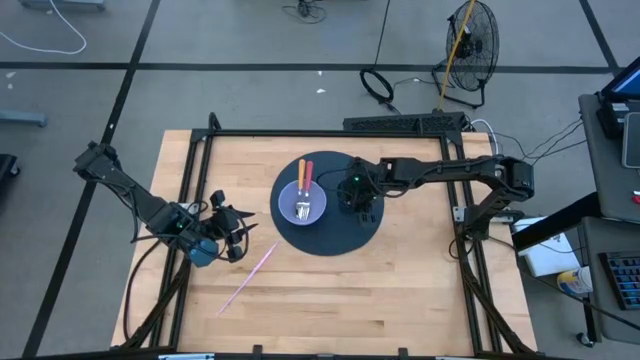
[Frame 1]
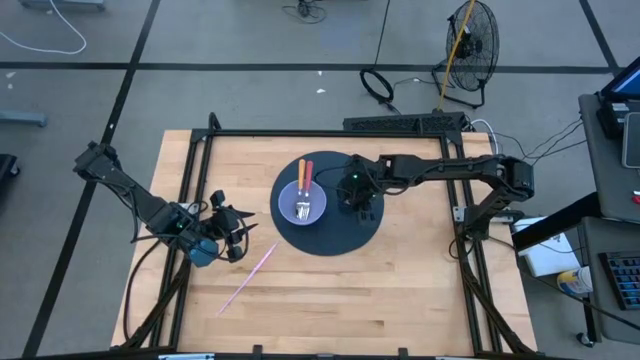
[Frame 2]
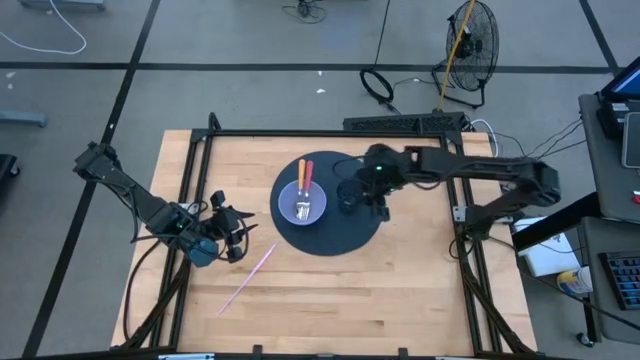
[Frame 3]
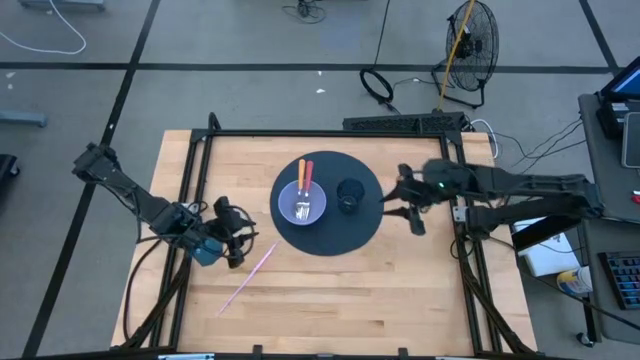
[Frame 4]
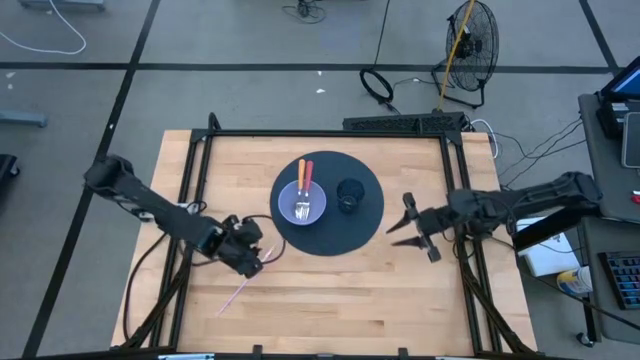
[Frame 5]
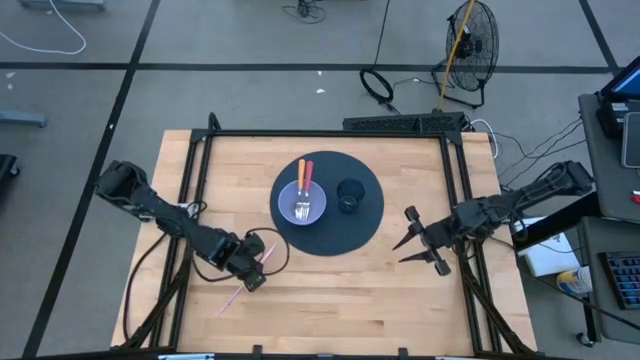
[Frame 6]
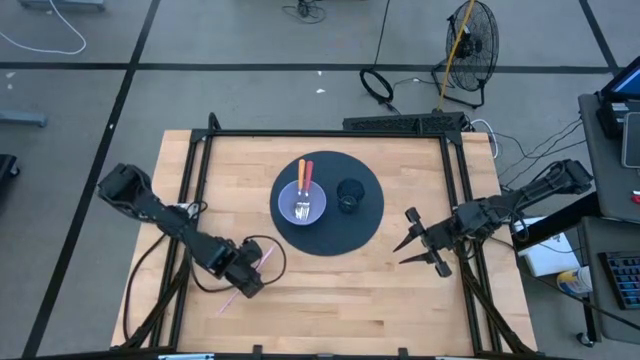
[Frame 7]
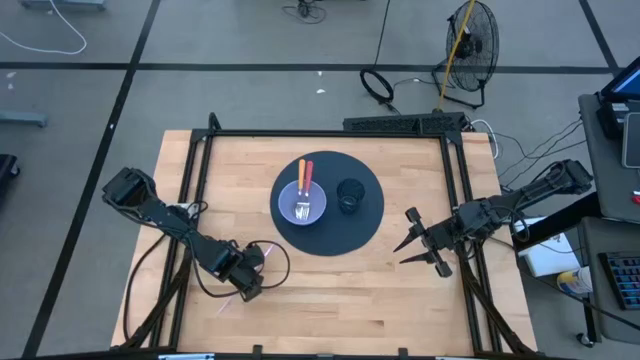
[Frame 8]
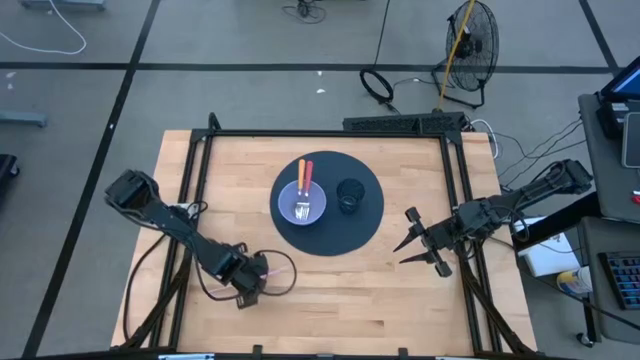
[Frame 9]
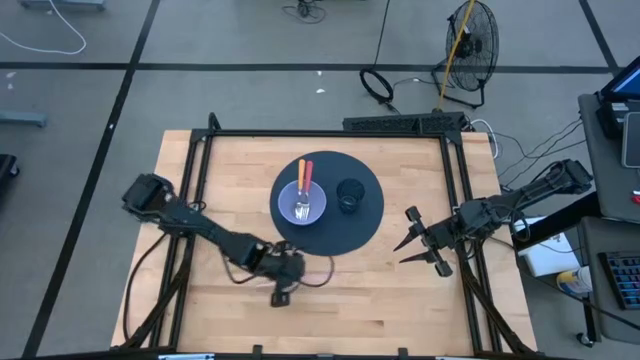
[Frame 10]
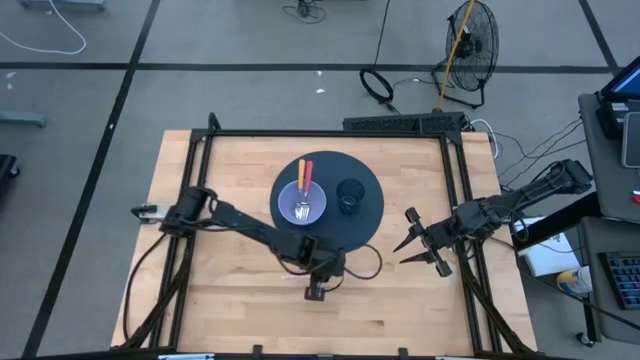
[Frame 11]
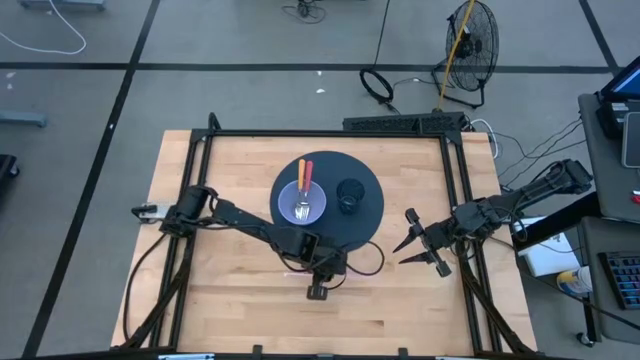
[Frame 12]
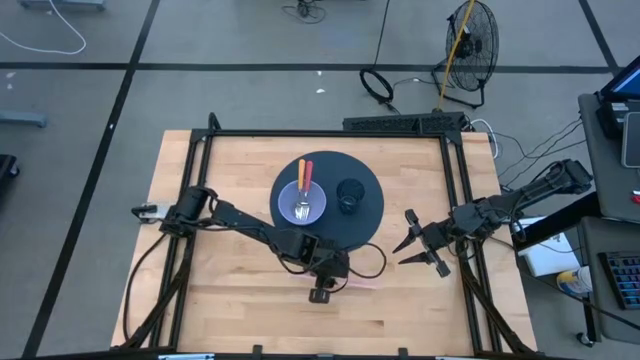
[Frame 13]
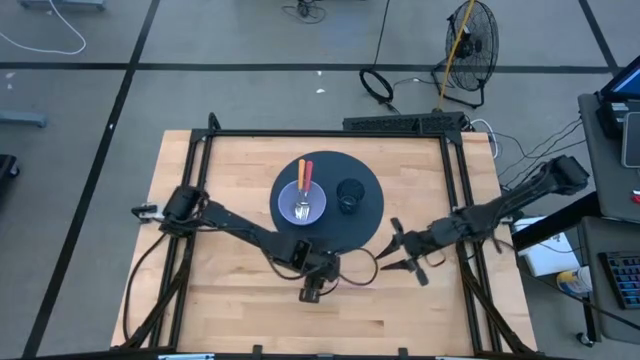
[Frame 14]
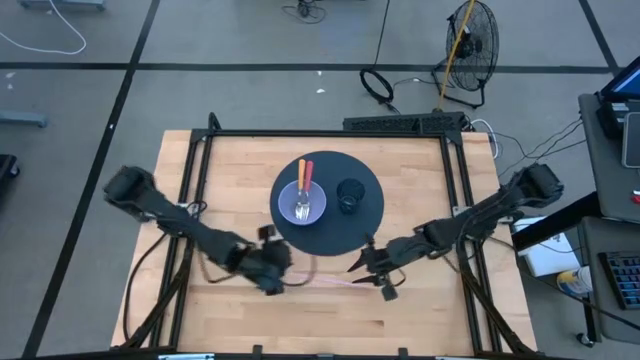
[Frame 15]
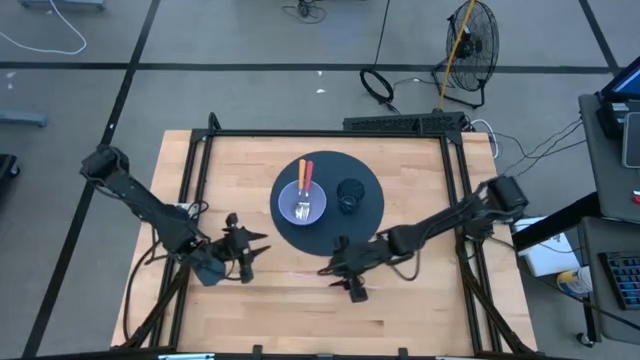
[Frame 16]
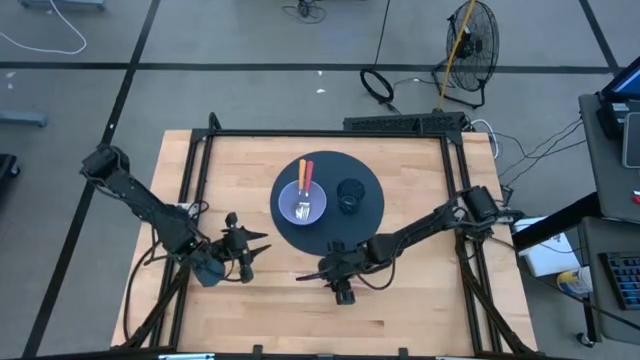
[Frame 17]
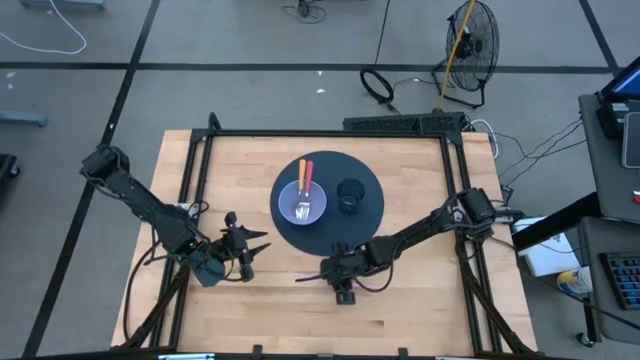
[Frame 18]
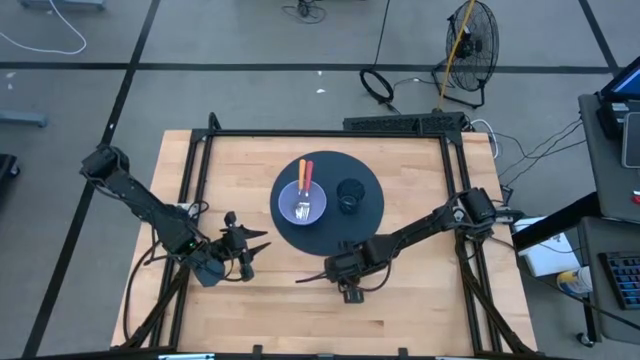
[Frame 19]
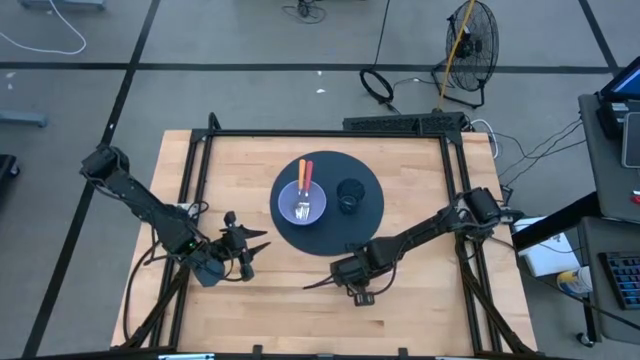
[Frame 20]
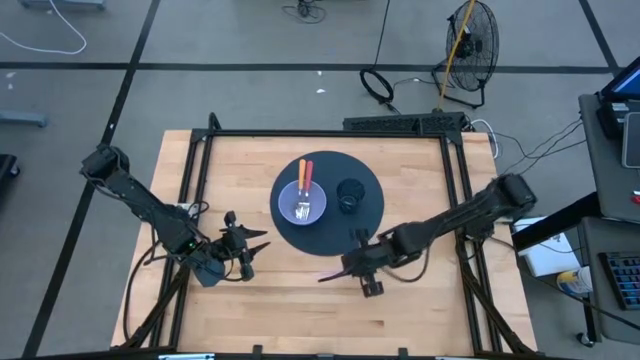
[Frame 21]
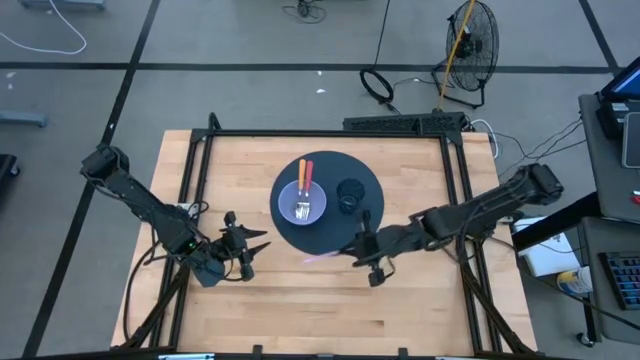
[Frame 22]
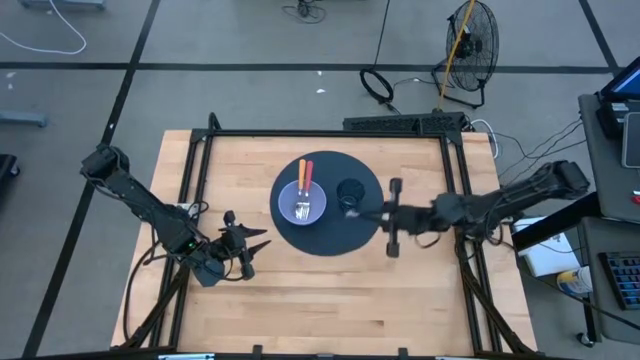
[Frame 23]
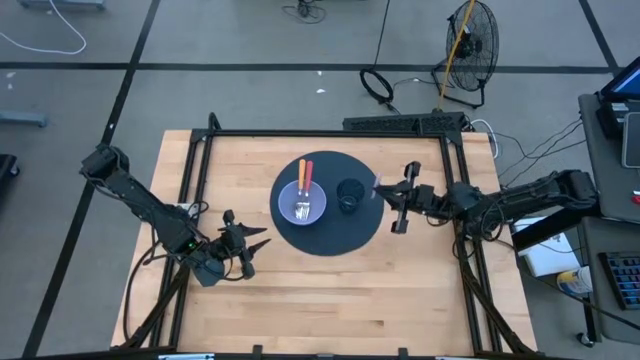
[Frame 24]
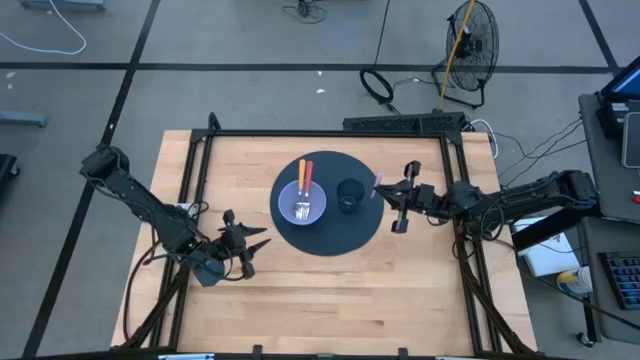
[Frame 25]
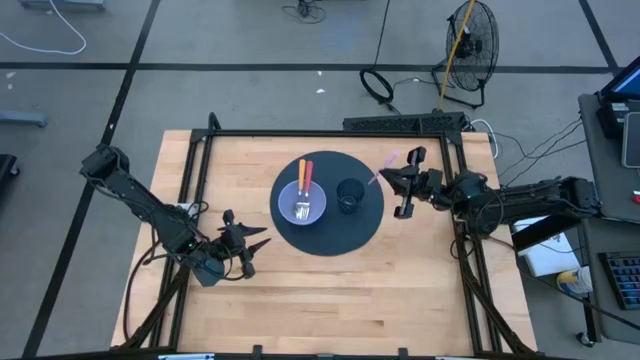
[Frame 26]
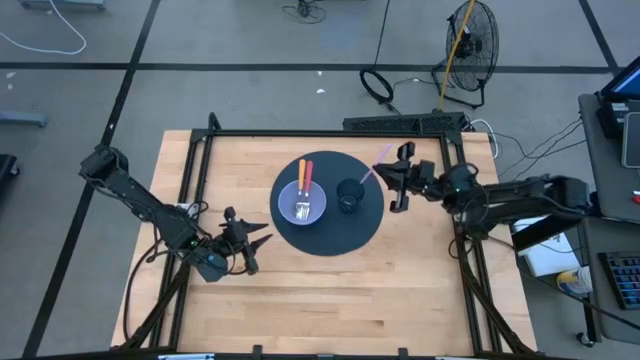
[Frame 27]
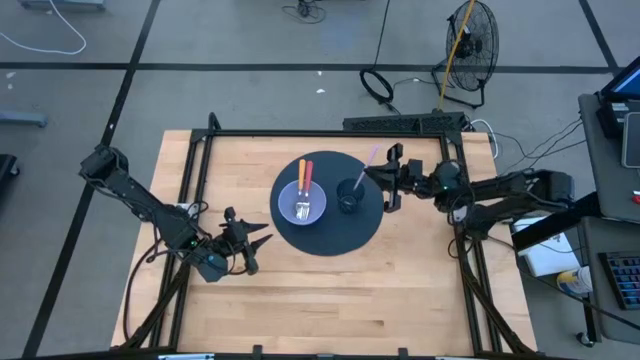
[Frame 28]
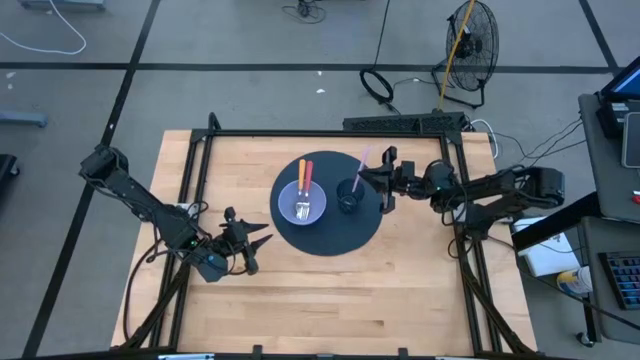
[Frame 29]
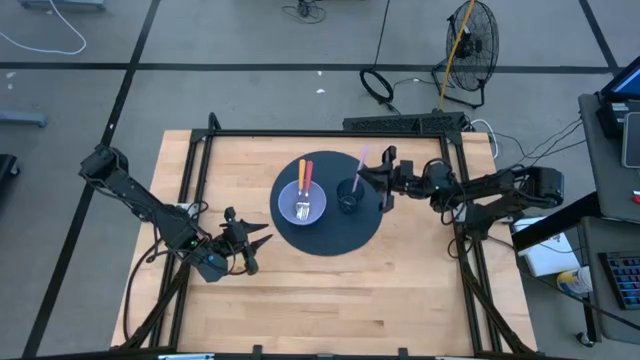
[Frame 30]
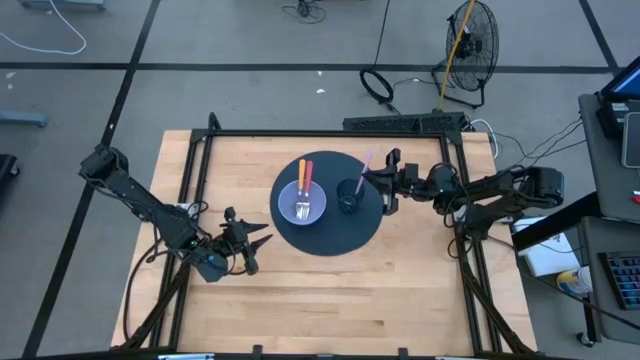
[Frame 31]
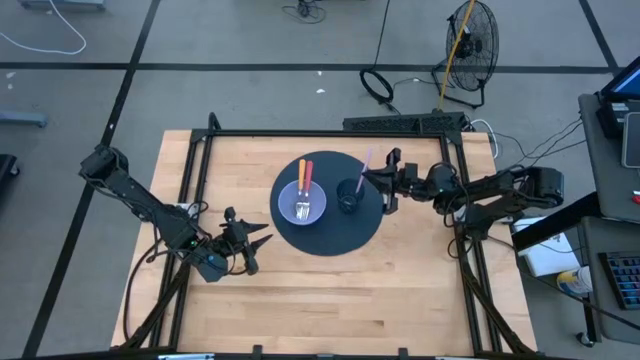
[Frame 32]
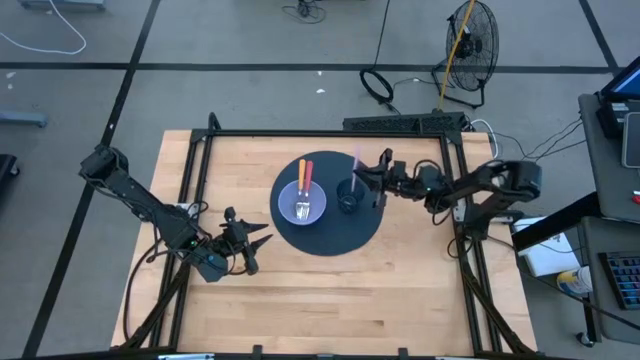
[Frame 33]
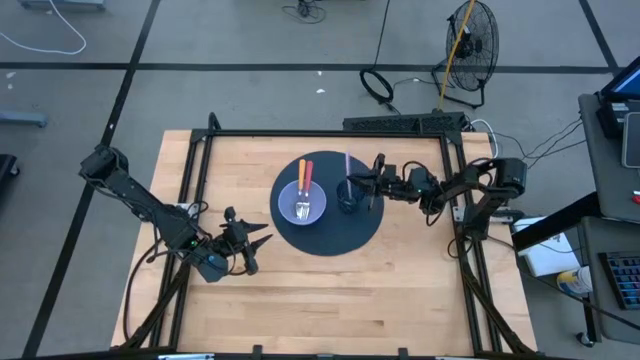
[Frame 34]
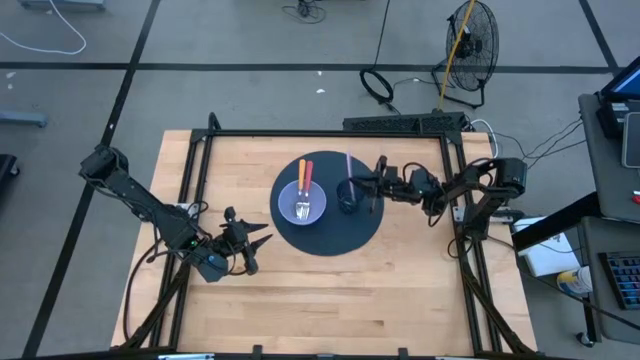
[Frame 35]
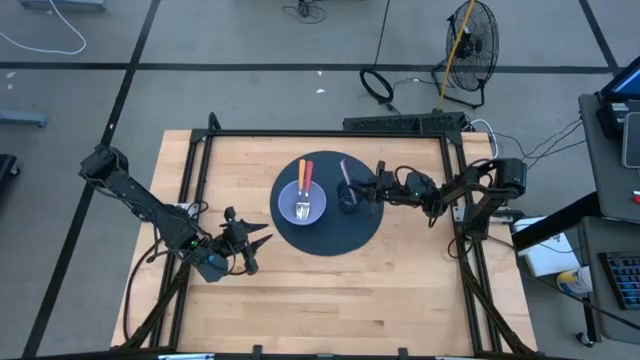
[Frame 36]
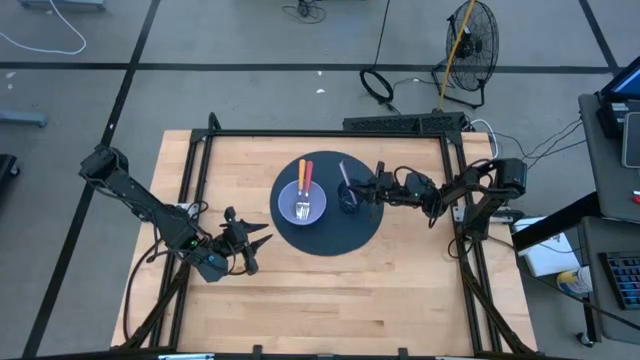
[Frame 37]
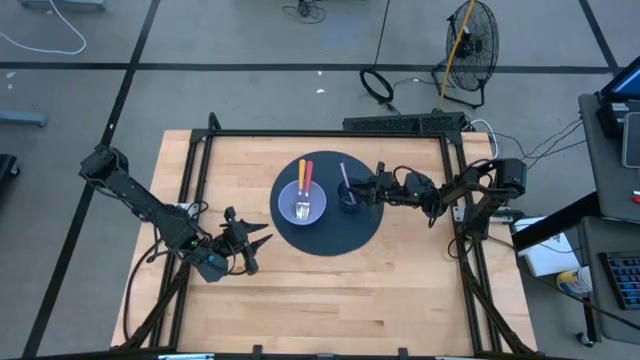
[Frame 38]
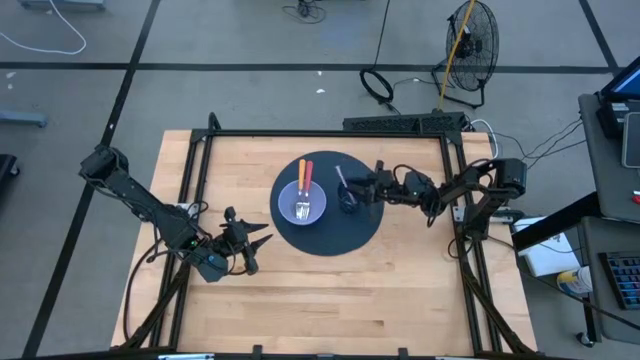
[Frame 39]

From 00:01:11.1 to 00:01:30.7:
Task: Pick & Place Utensil
Put the pink straw into the blue cup on the mat
